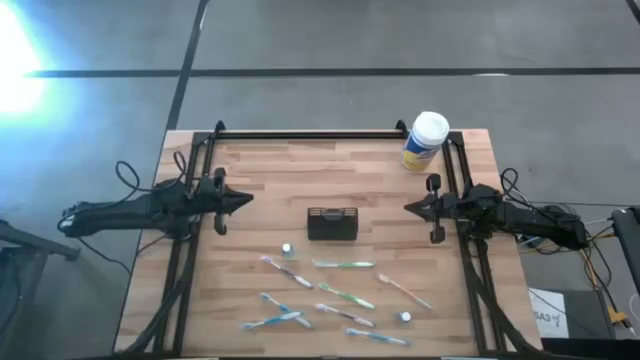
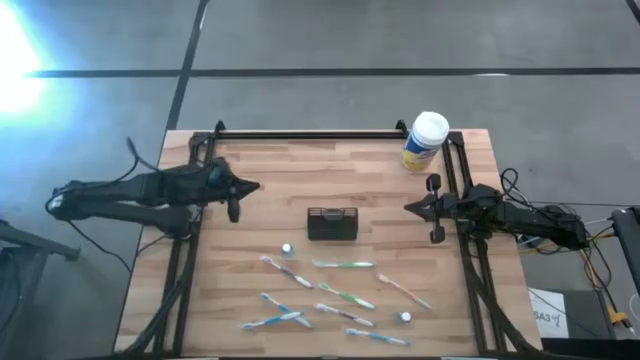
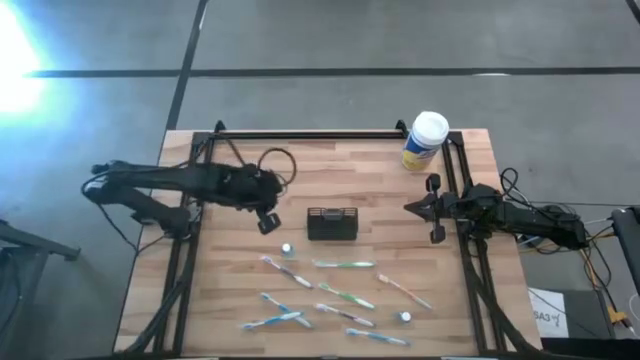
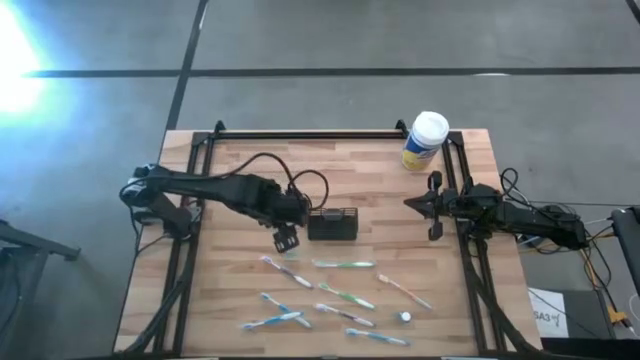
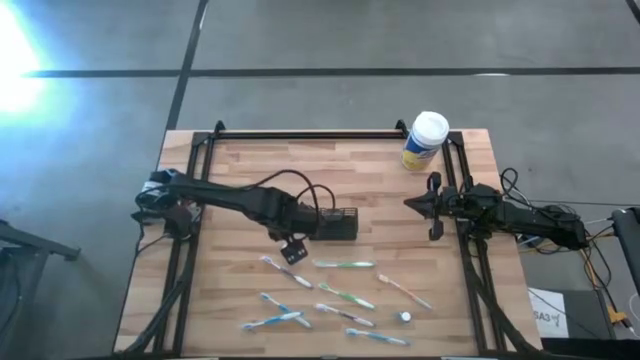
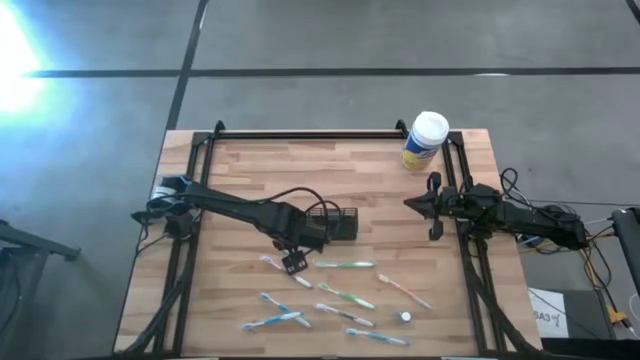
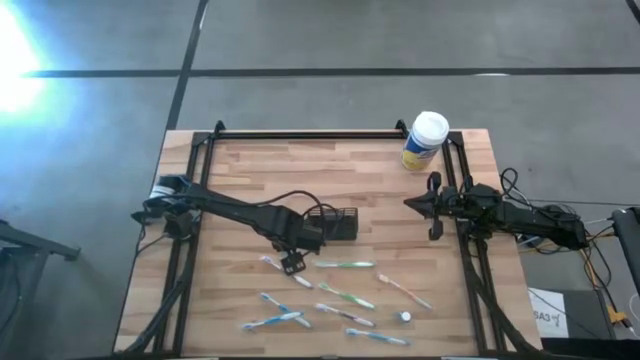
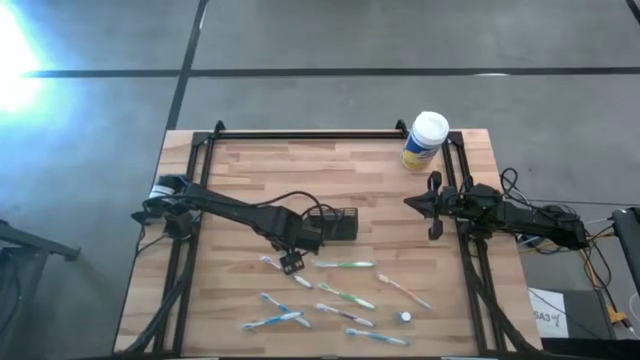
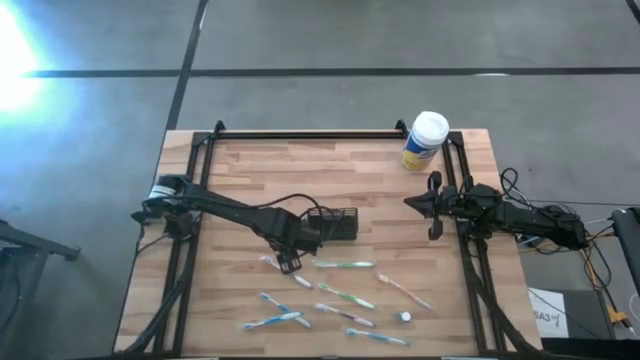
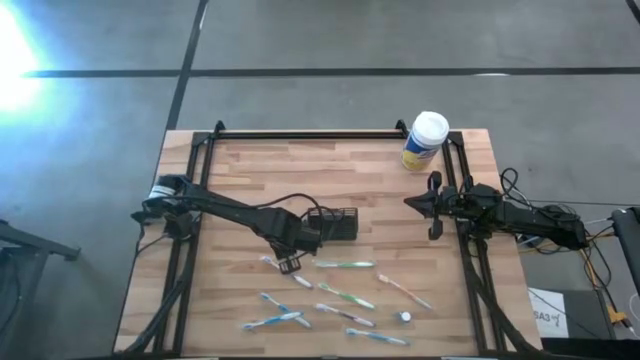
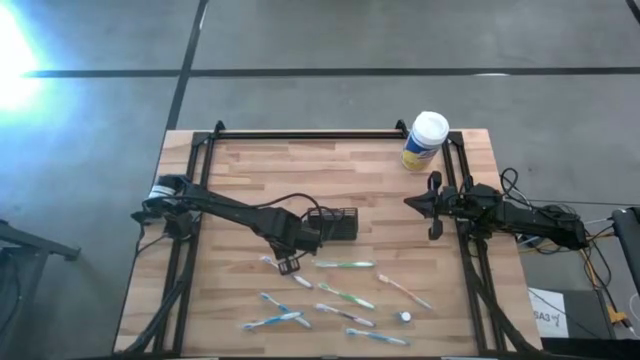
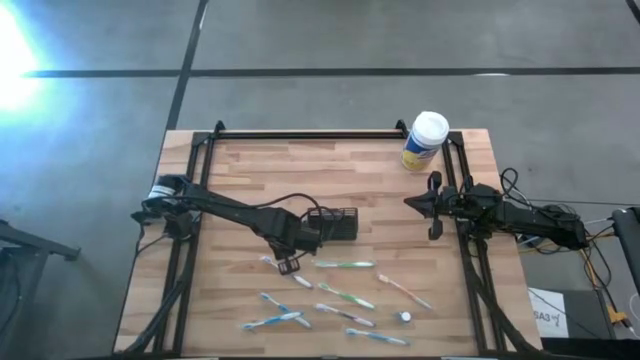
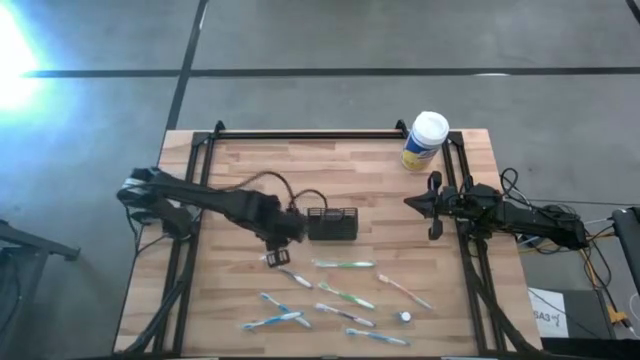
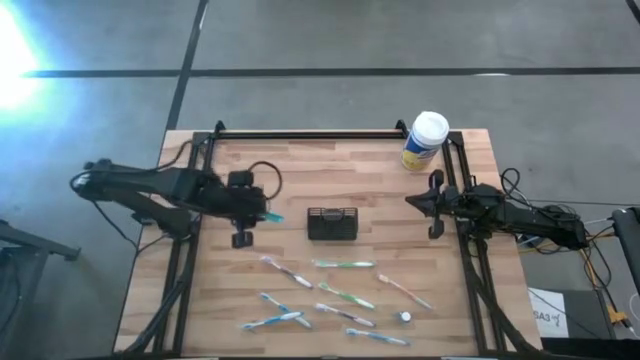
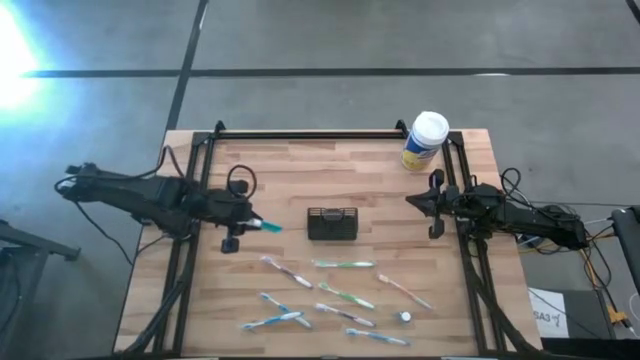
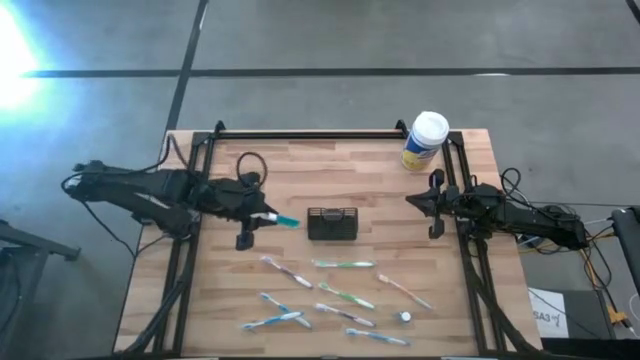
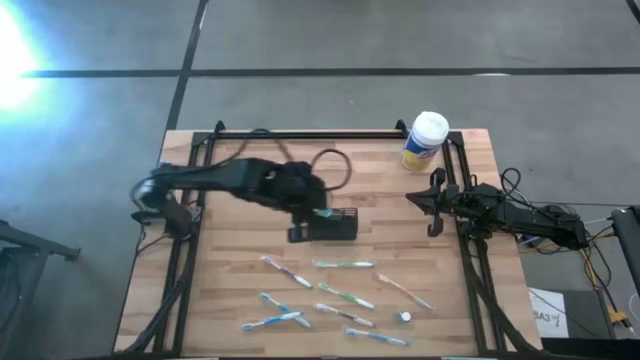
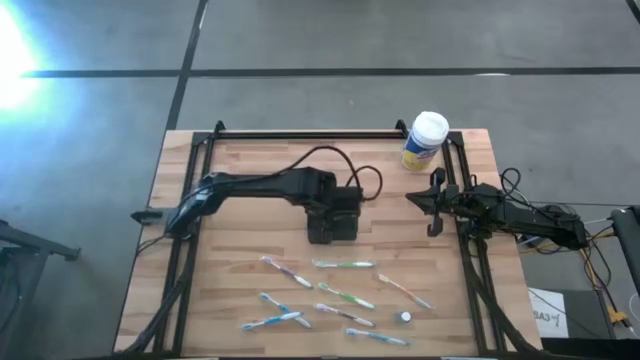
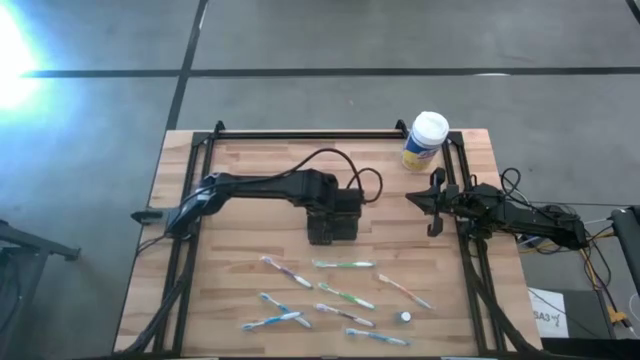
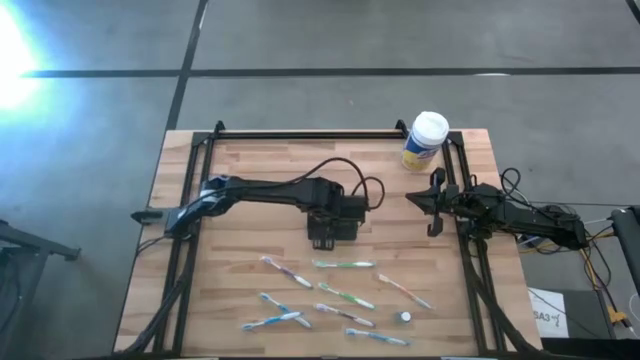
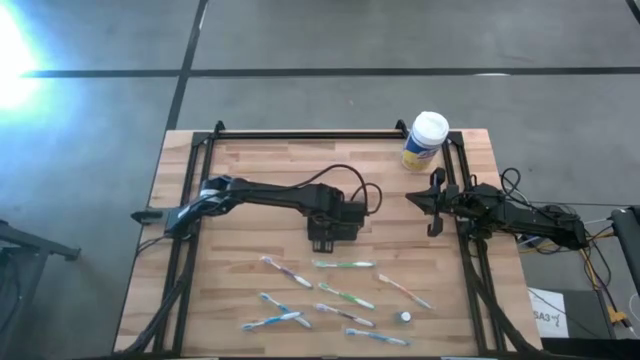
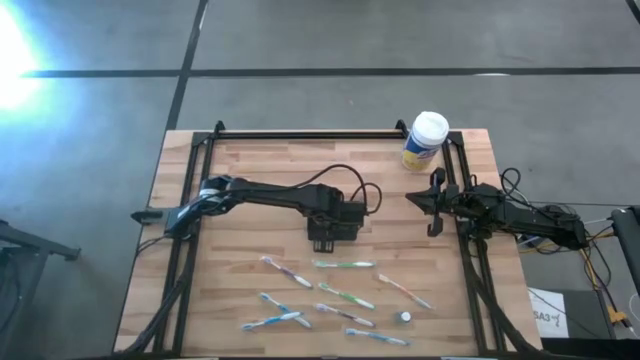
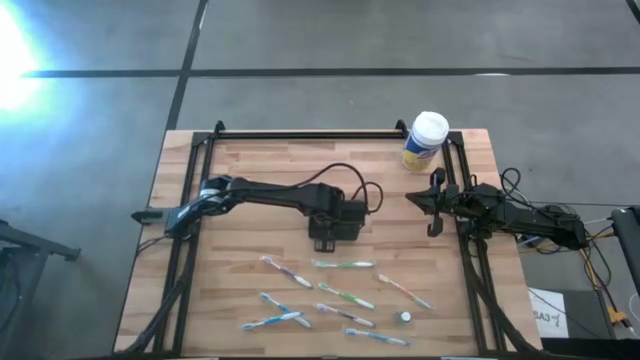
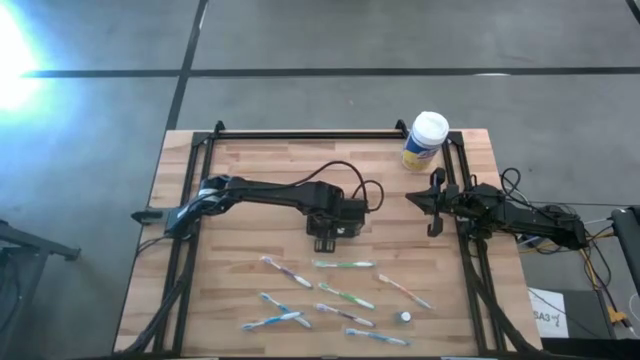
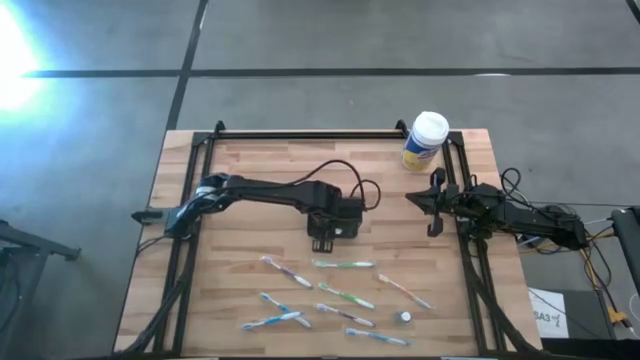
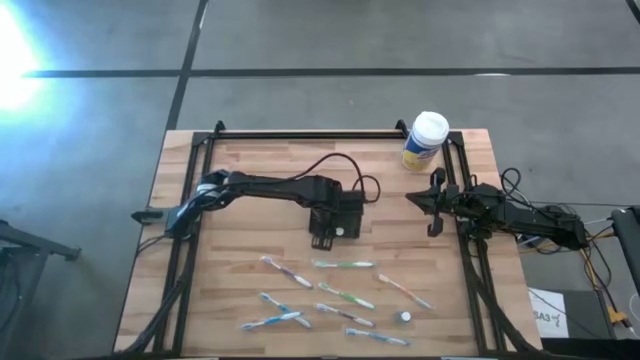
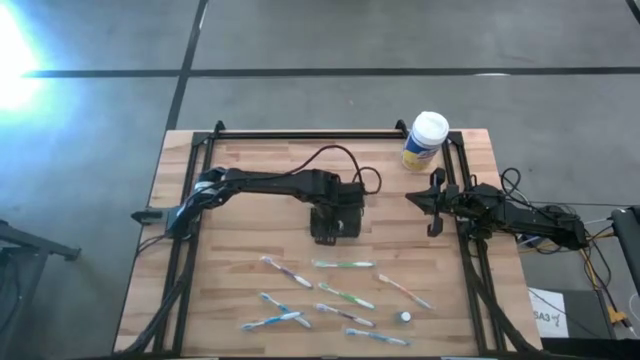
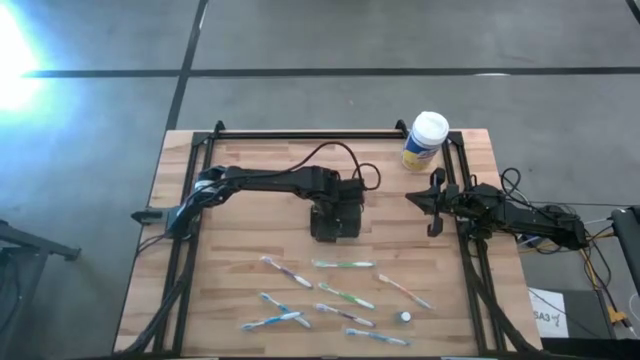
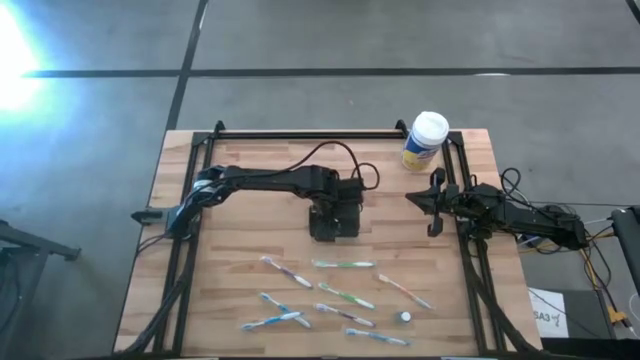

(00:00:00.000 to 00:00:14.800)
Task: Pick & Place toothbrushing station
Put the top blue mouthwash into the black organizer

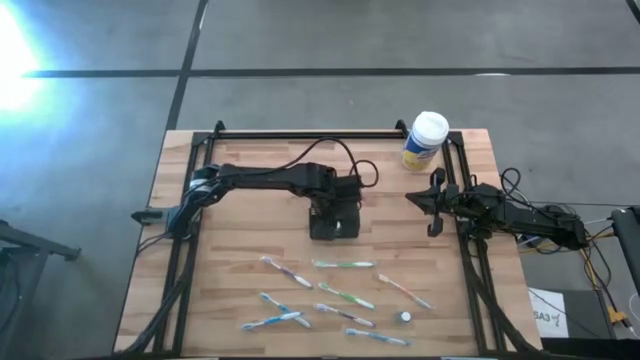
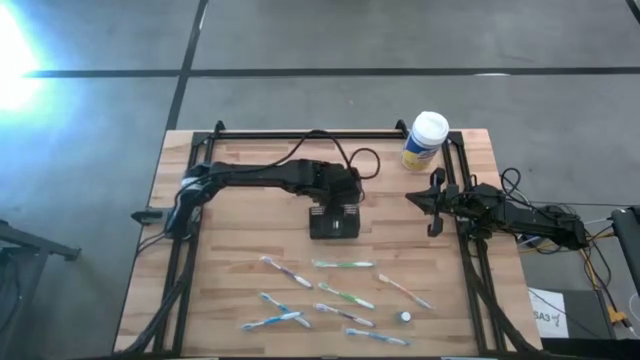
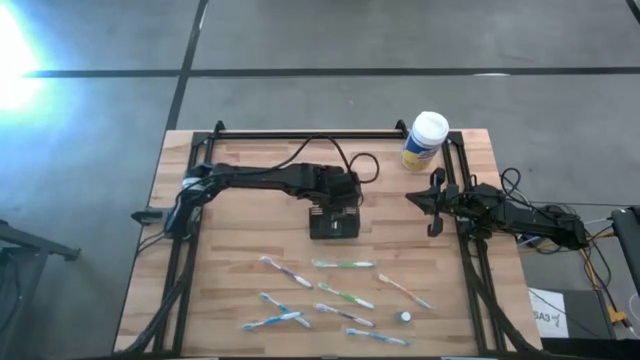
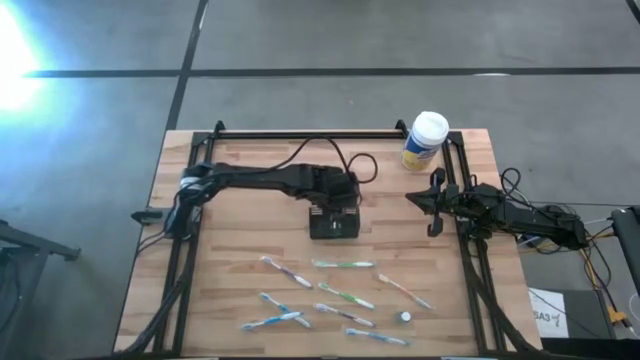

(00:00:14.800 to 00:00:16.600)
Adjust the black organizer

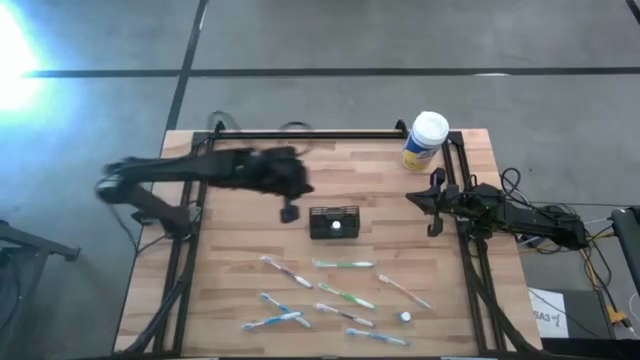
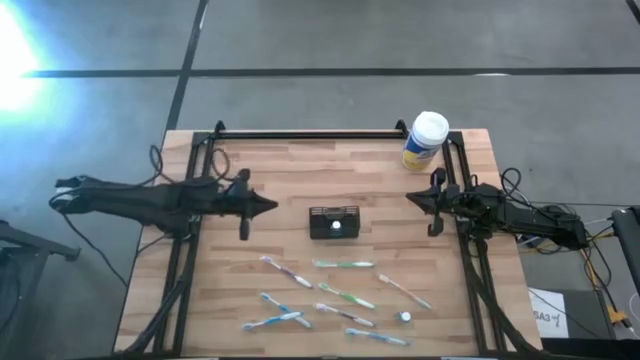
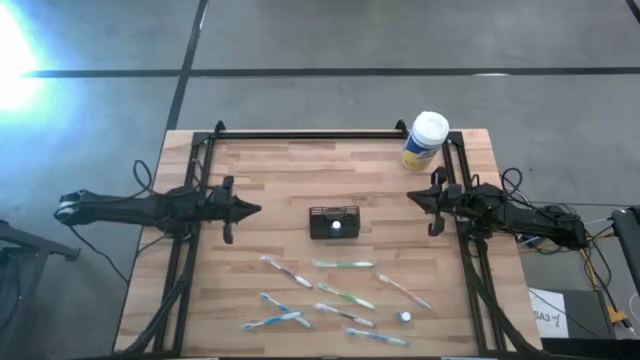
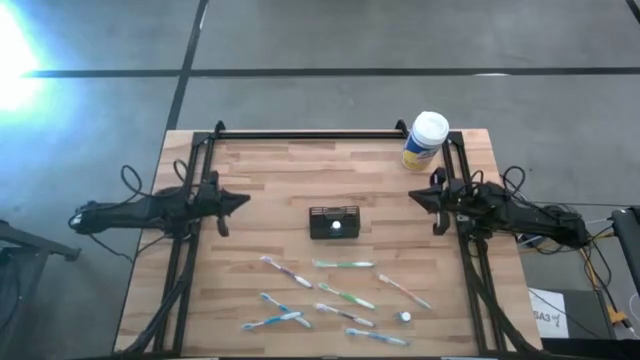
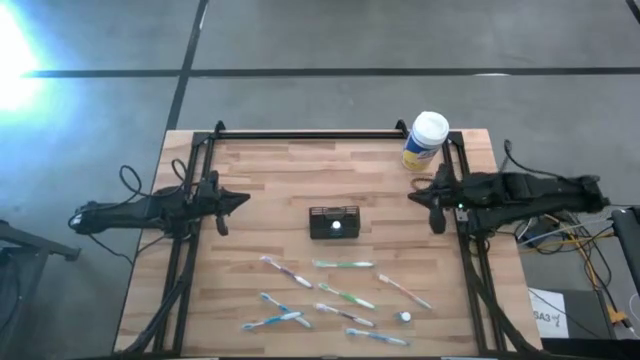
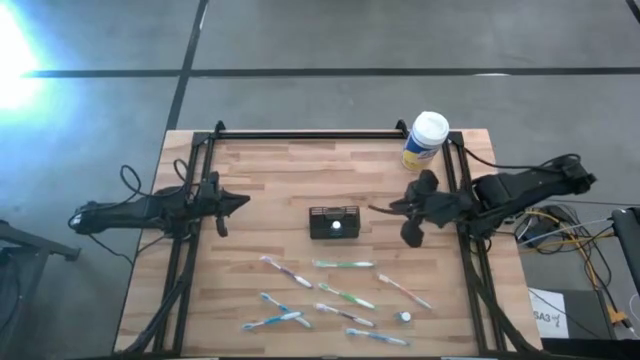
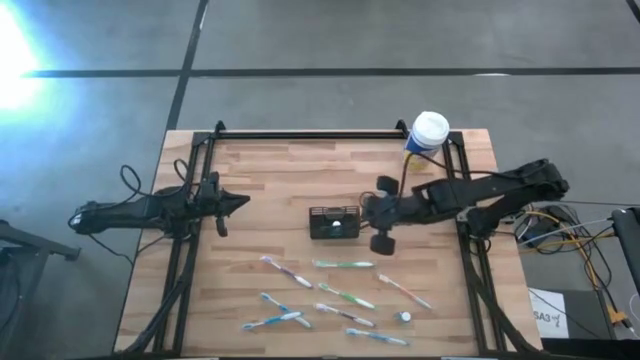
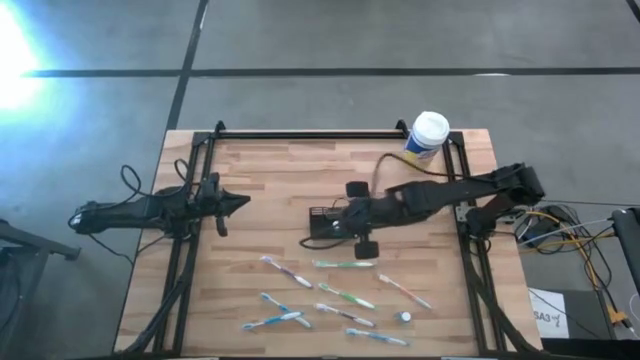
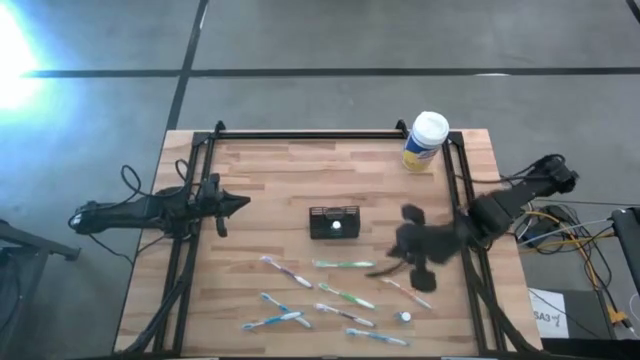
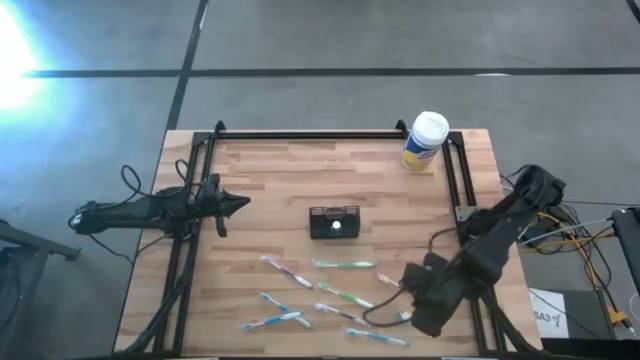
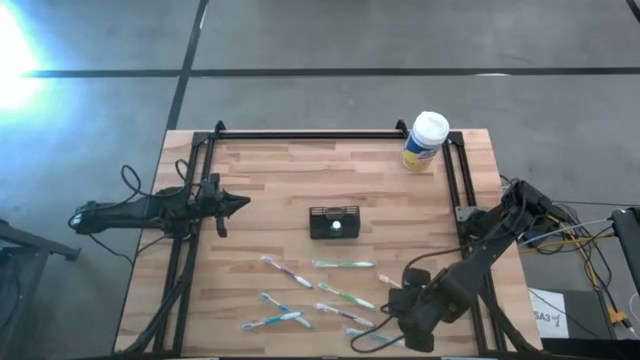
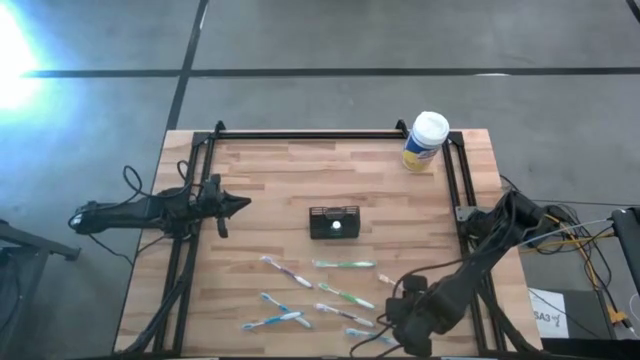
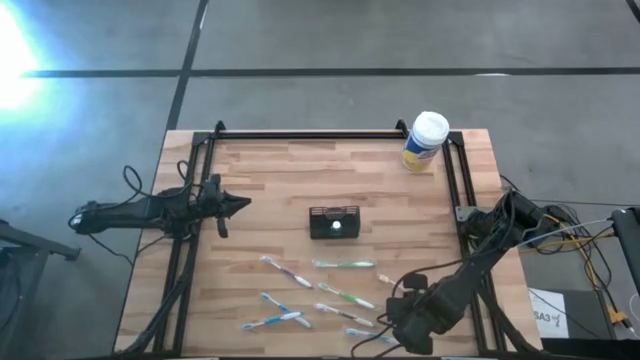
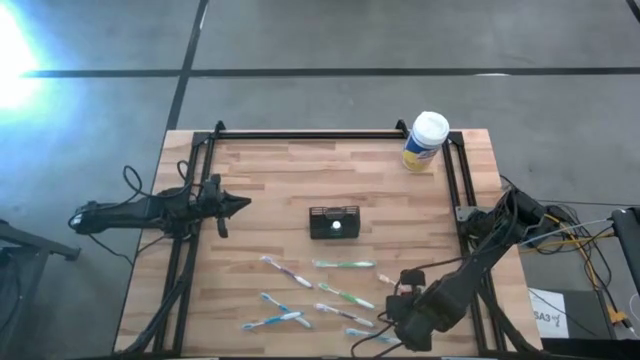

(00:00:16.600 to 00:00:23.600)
Put the blue mouthwash into the black organizer
